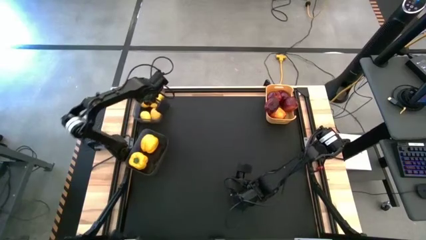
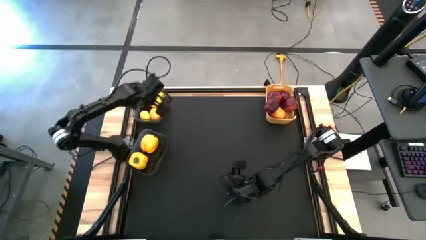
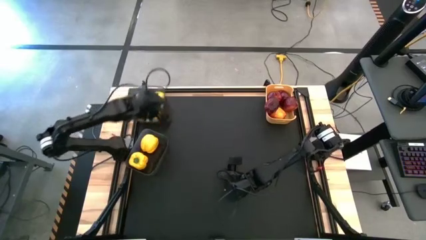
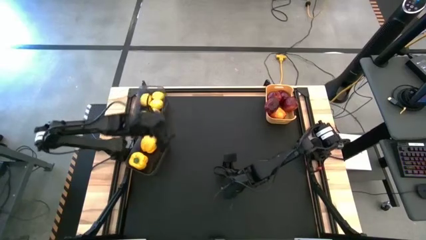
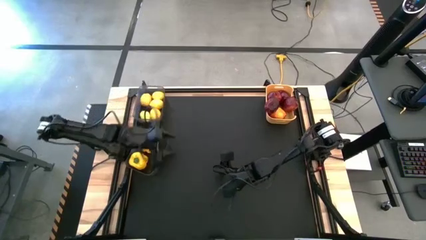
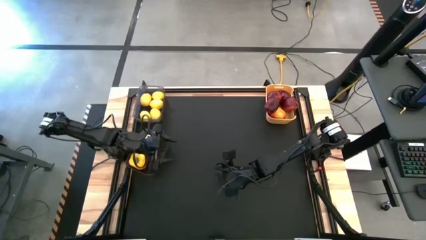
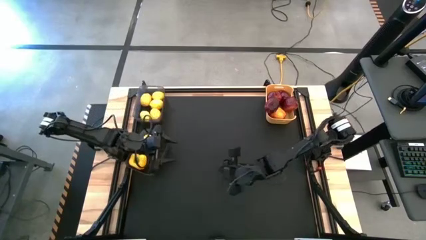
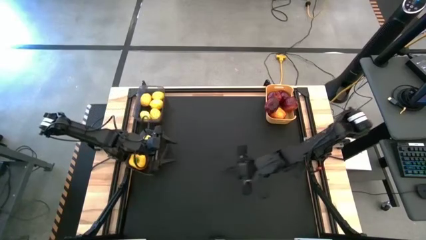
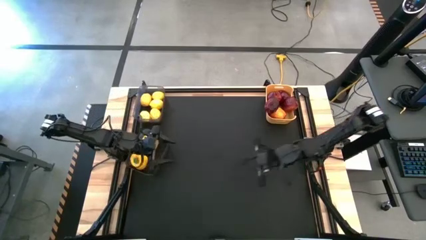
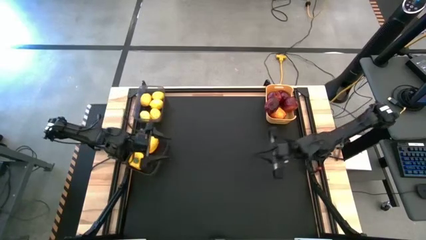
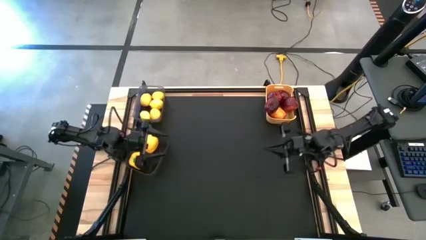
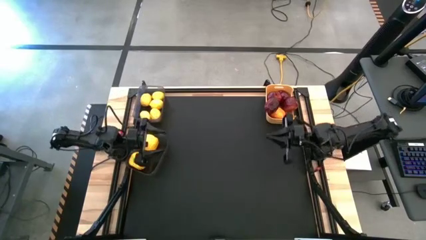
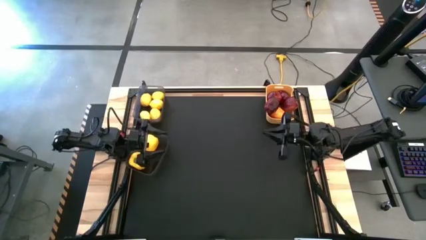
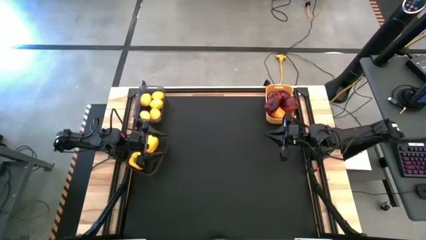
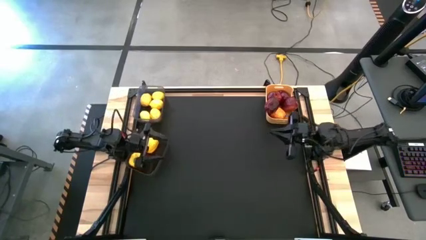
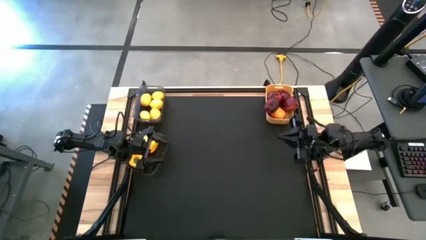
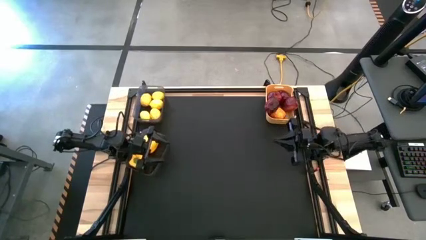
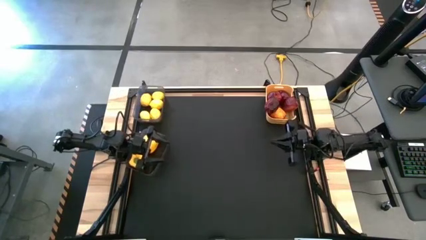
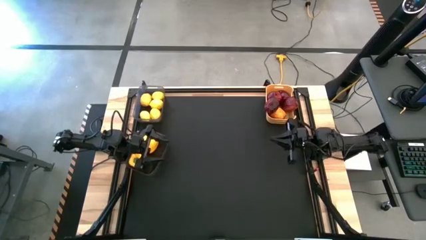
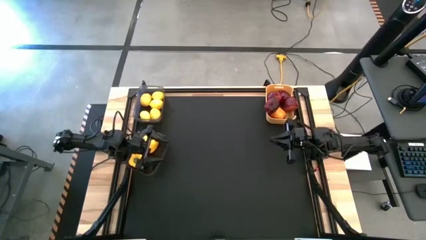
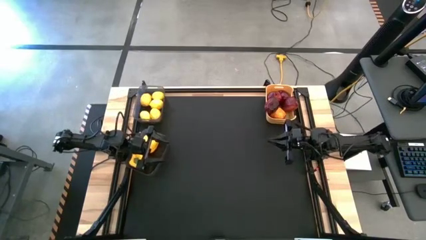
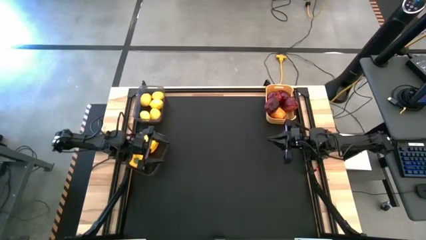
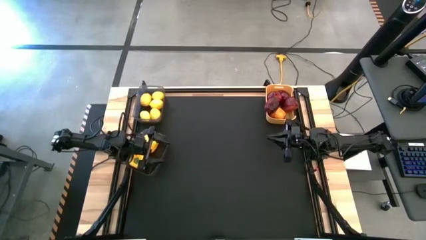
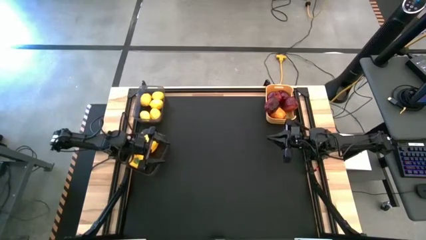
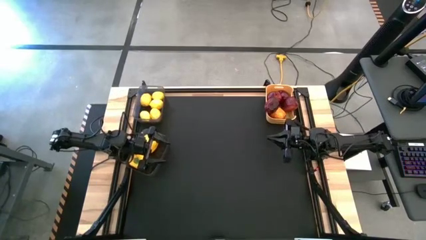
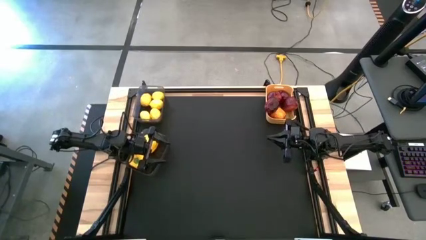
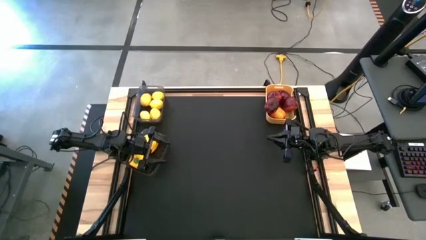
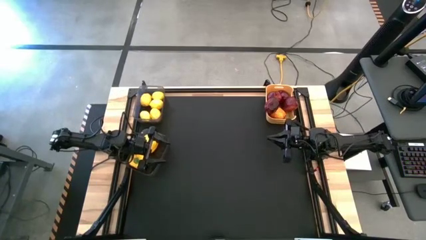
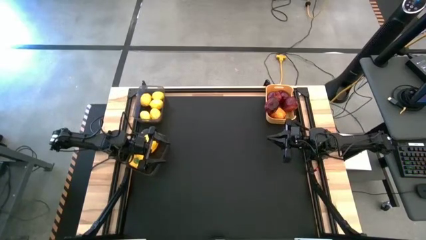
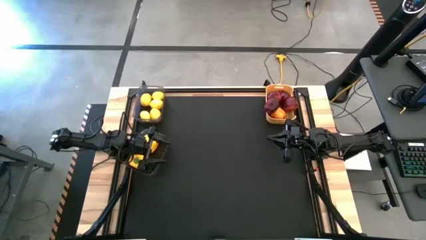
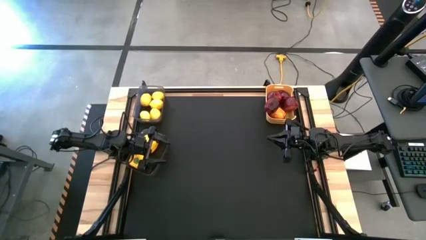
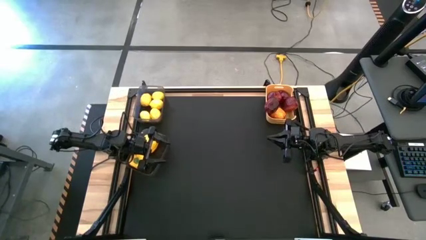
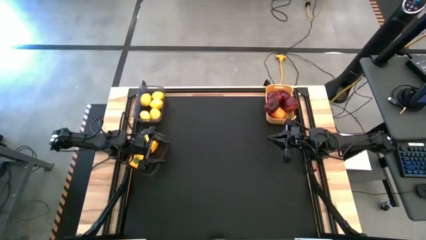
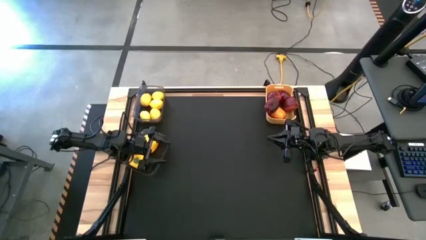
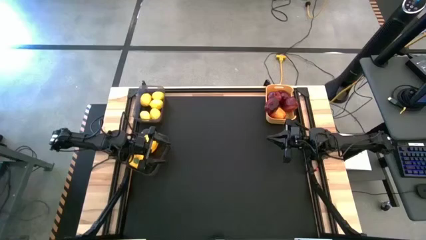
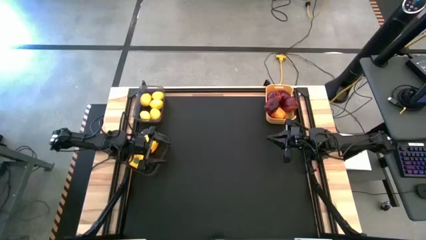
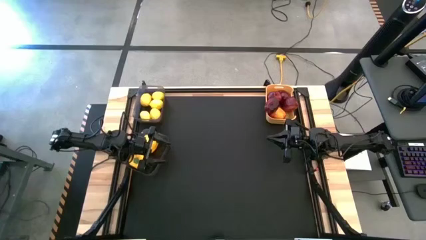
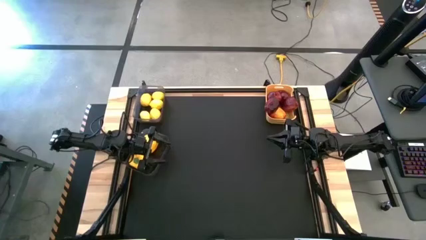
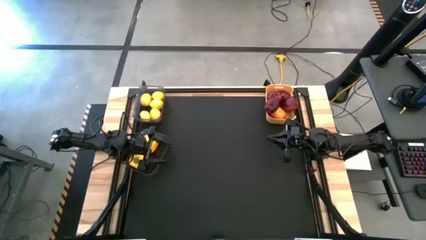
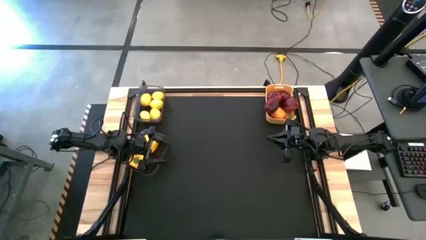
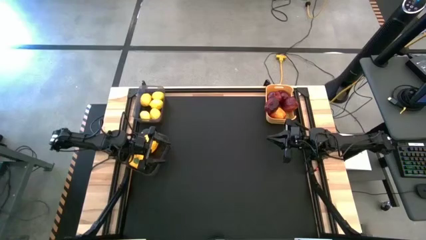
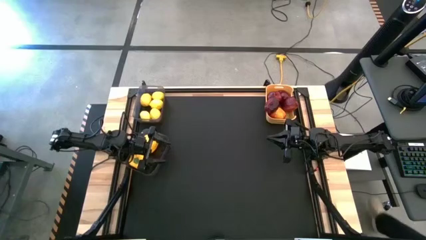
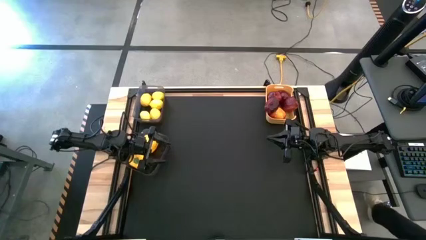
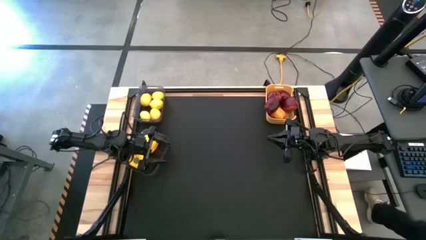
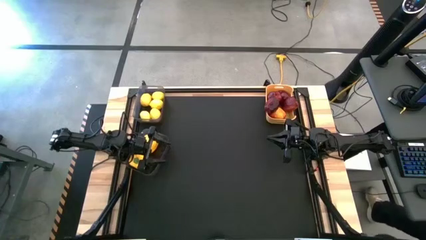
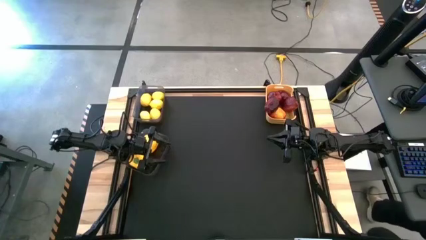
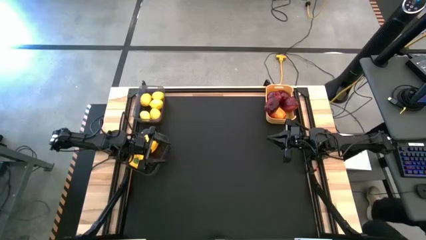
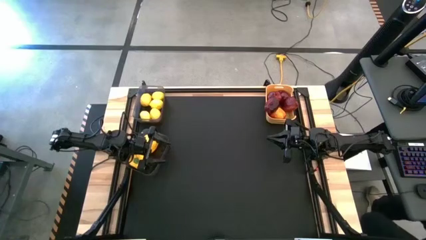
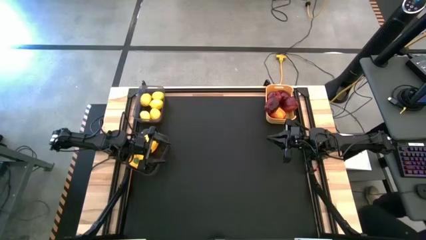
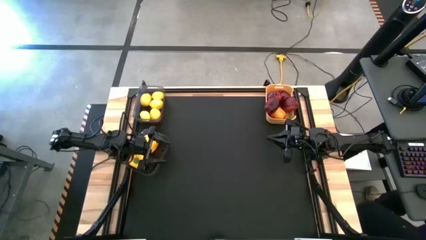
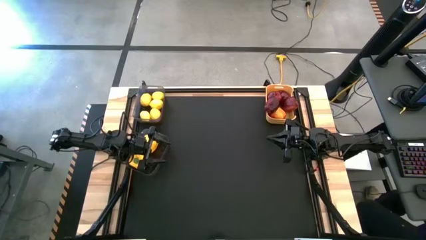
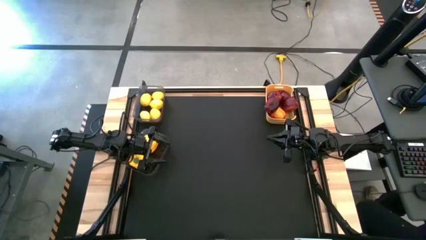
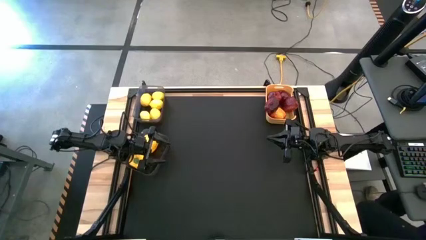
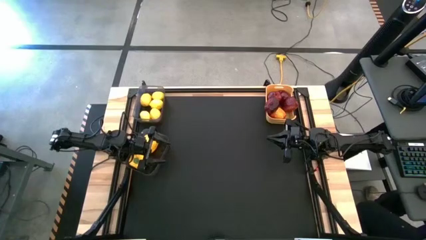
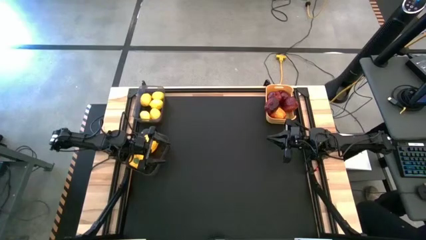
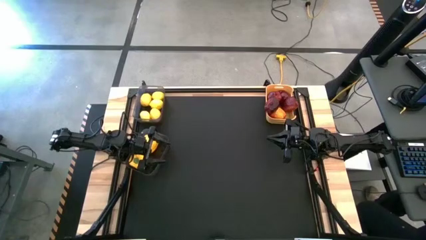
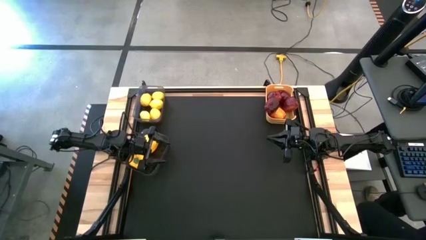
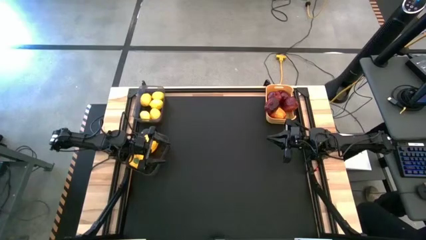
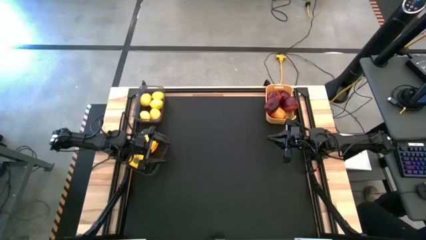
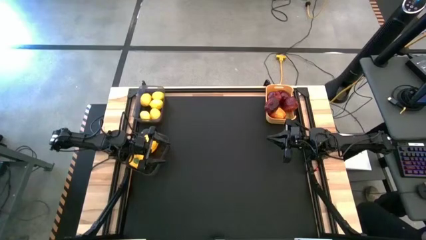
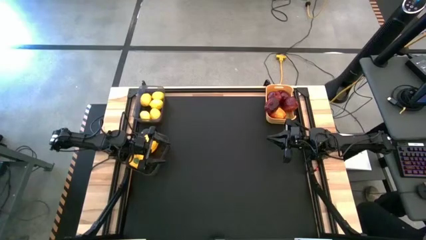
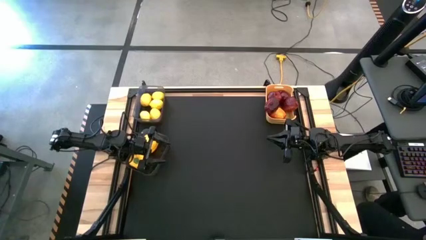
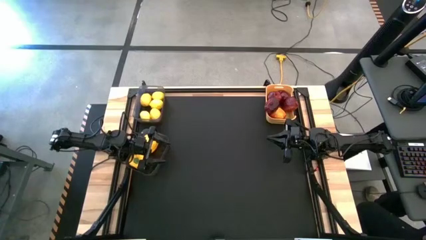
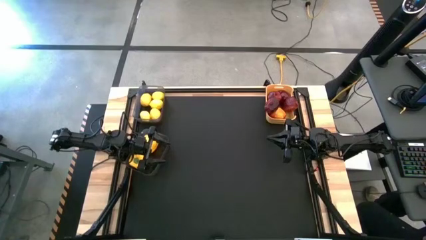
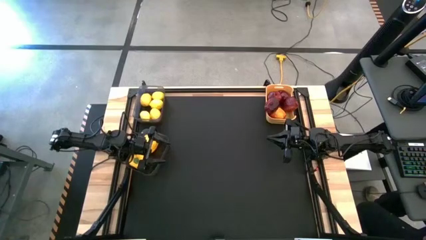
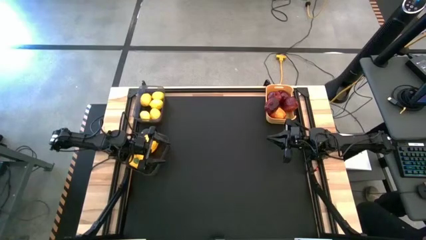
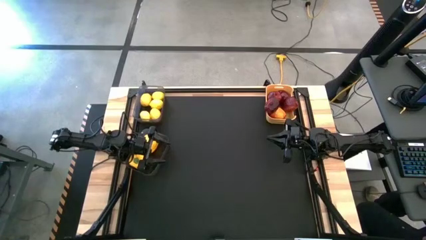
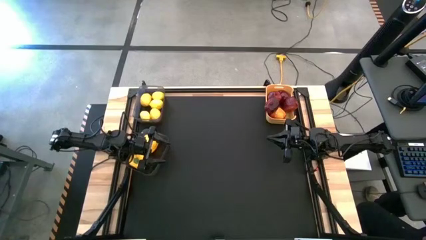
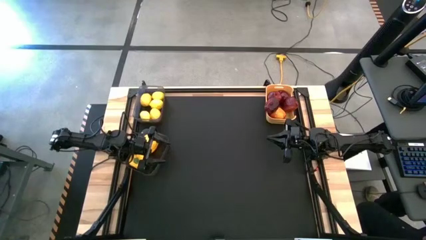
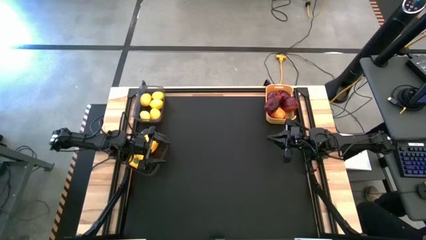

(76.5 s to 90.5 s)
Task: Sort produce into baskets
Return to Home Position
